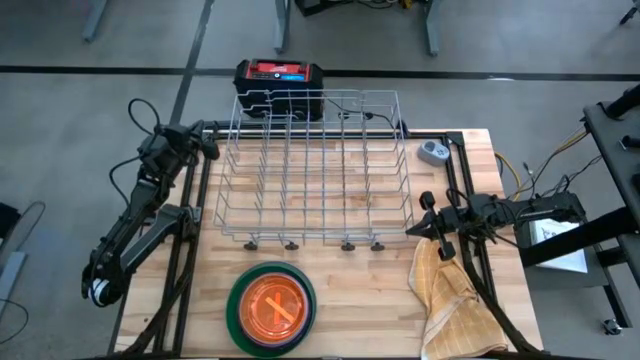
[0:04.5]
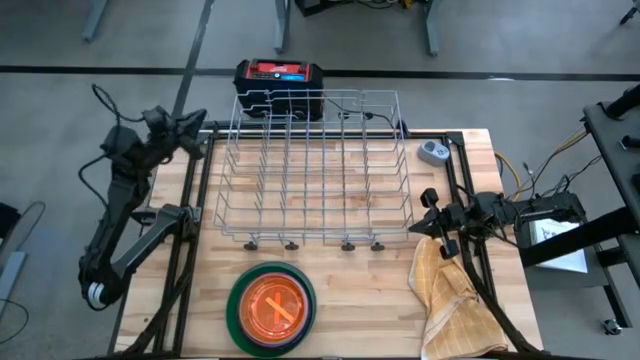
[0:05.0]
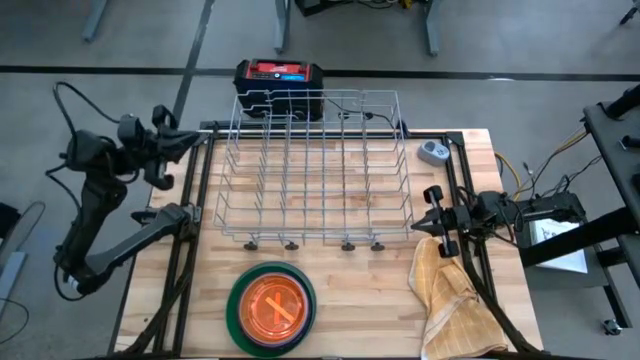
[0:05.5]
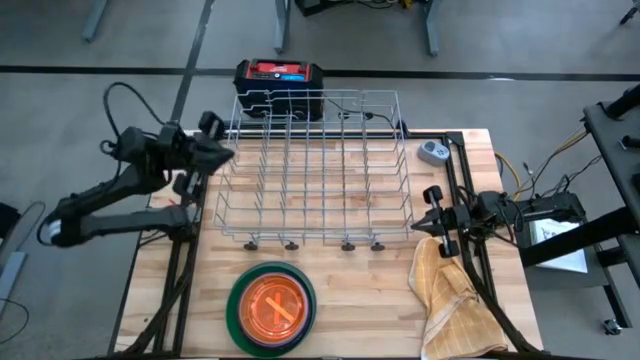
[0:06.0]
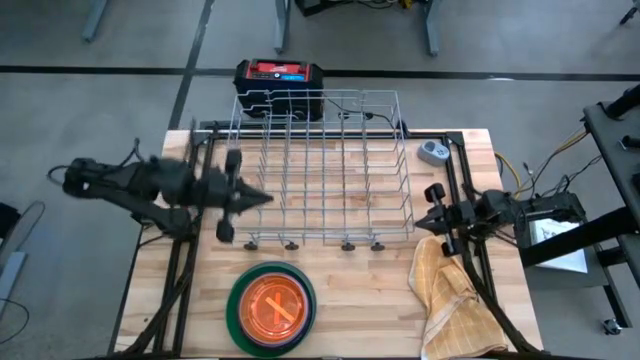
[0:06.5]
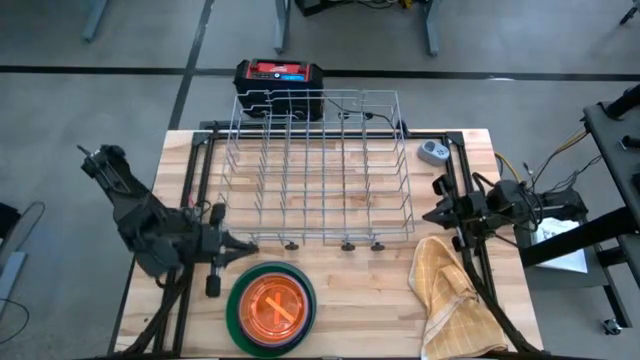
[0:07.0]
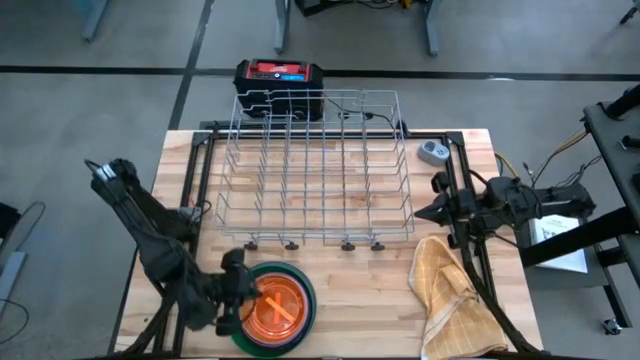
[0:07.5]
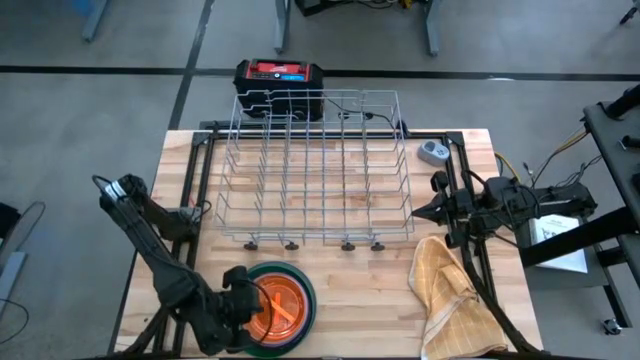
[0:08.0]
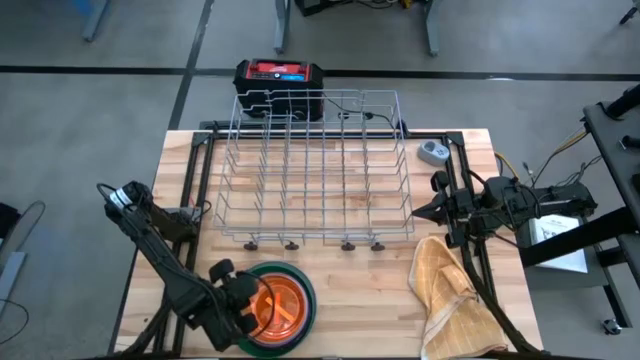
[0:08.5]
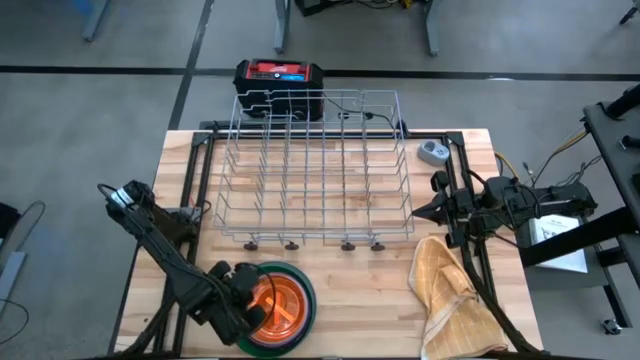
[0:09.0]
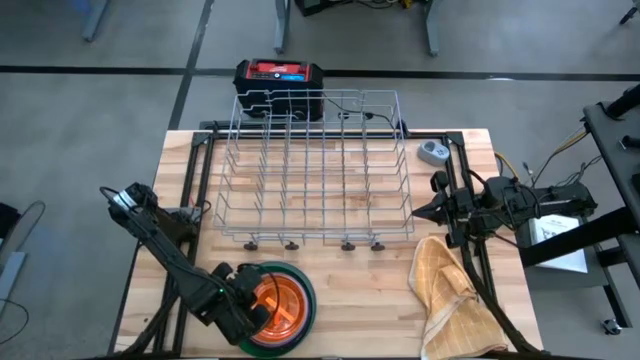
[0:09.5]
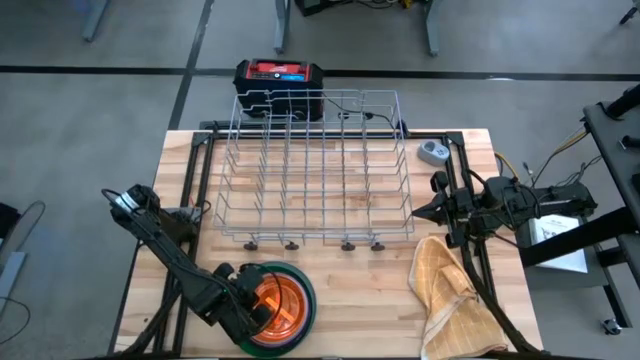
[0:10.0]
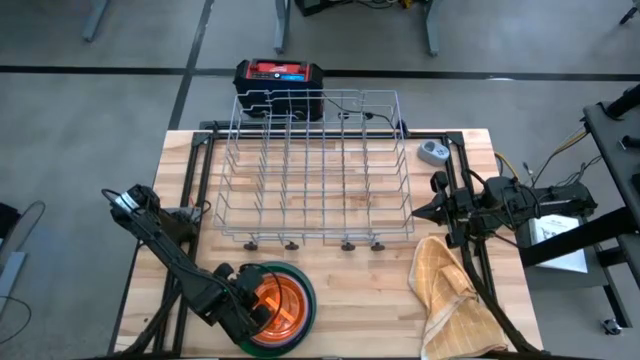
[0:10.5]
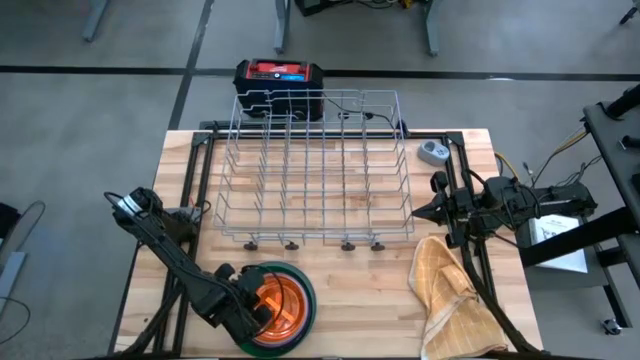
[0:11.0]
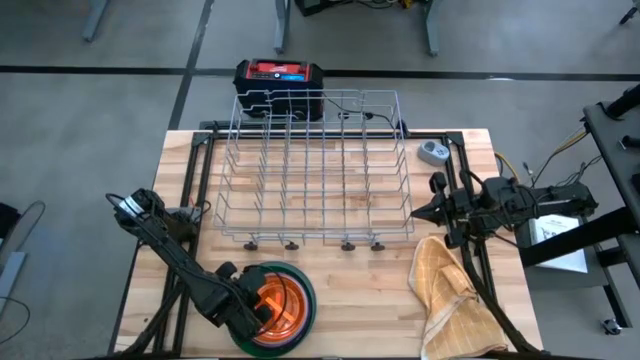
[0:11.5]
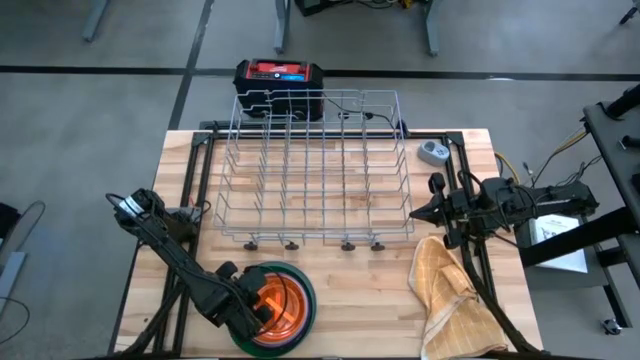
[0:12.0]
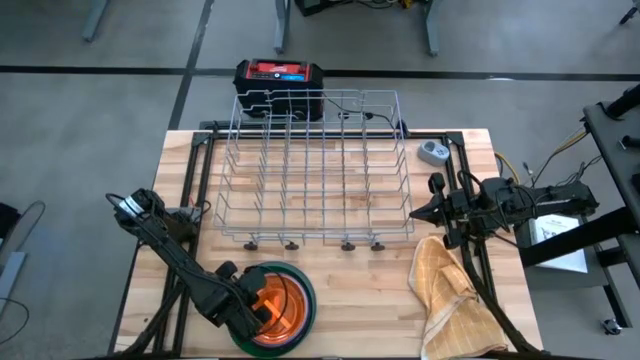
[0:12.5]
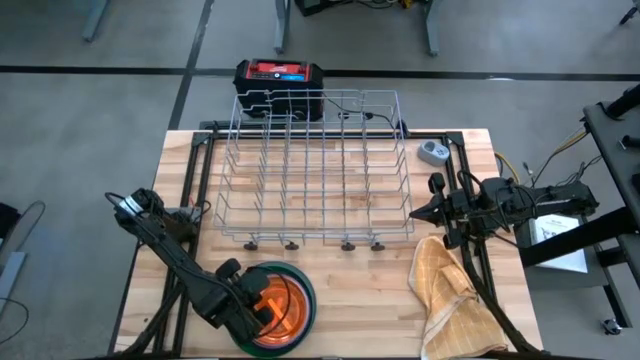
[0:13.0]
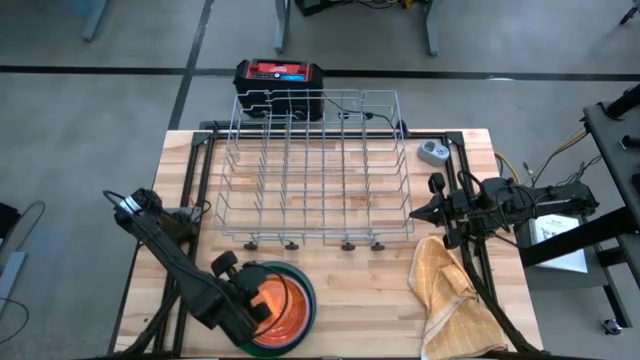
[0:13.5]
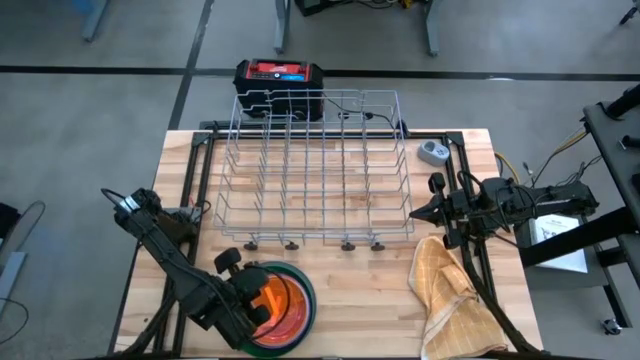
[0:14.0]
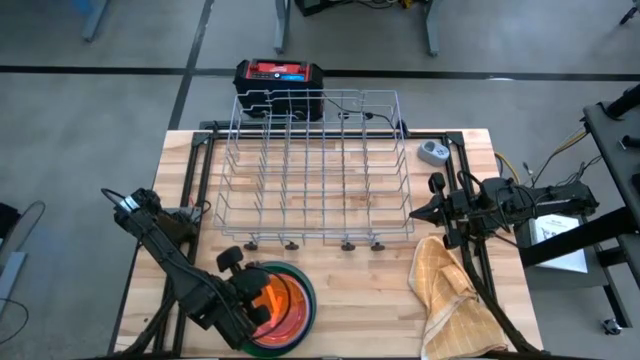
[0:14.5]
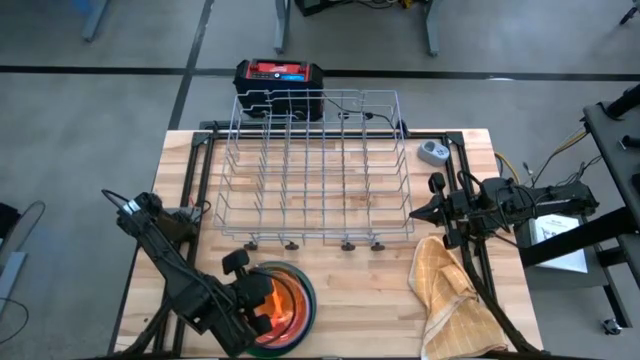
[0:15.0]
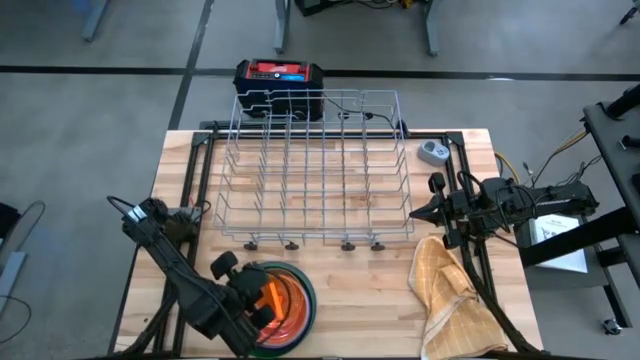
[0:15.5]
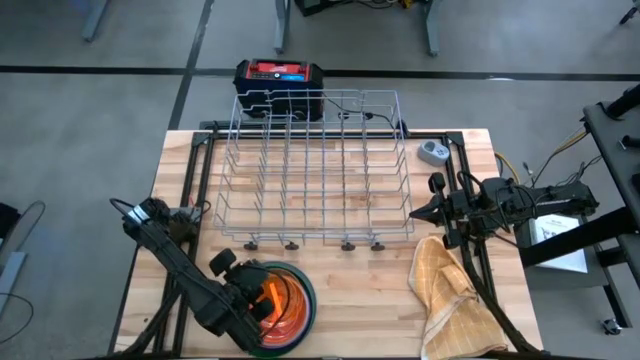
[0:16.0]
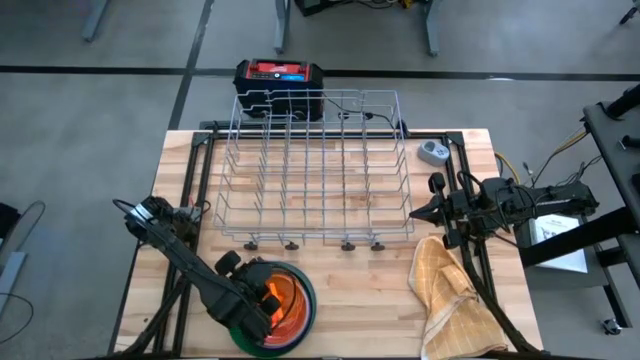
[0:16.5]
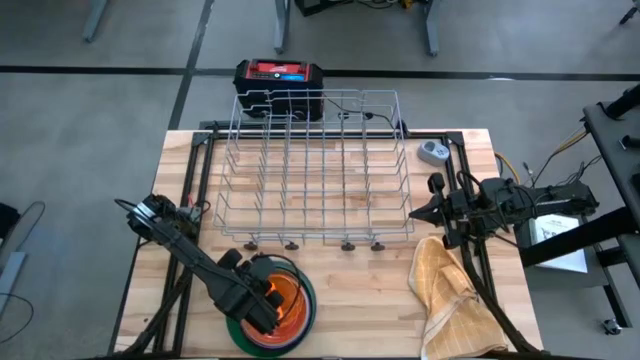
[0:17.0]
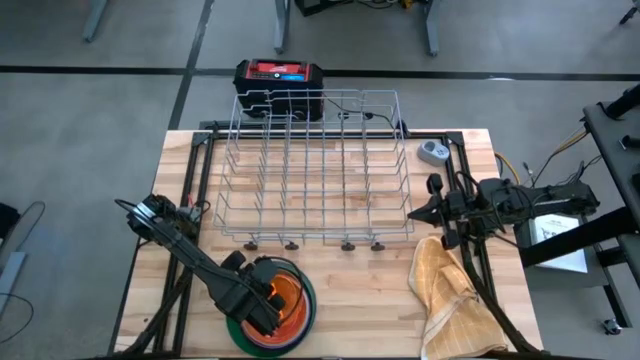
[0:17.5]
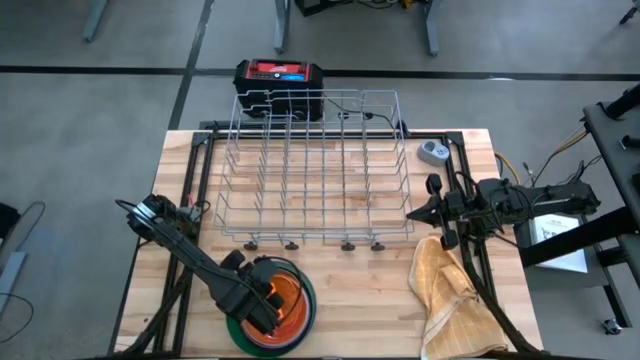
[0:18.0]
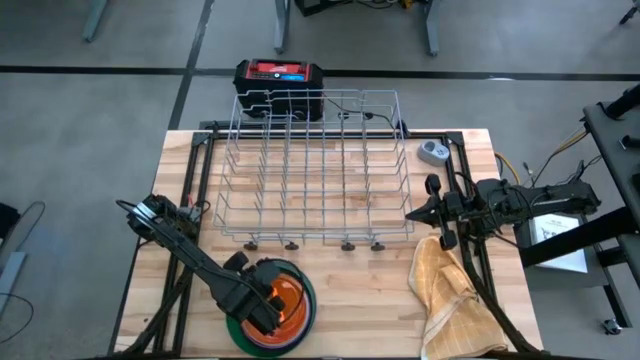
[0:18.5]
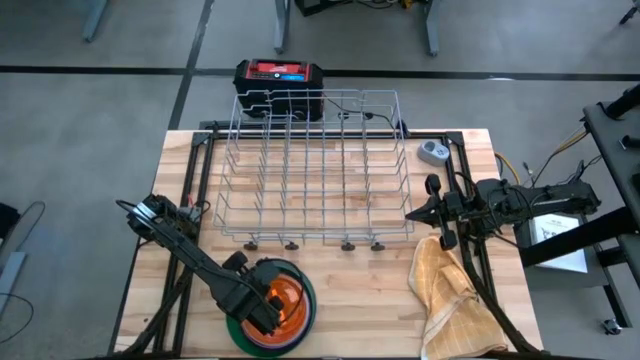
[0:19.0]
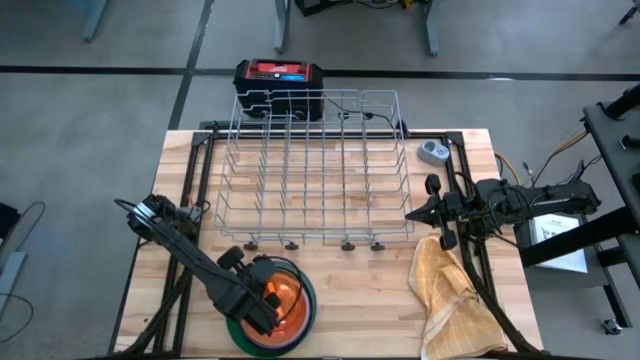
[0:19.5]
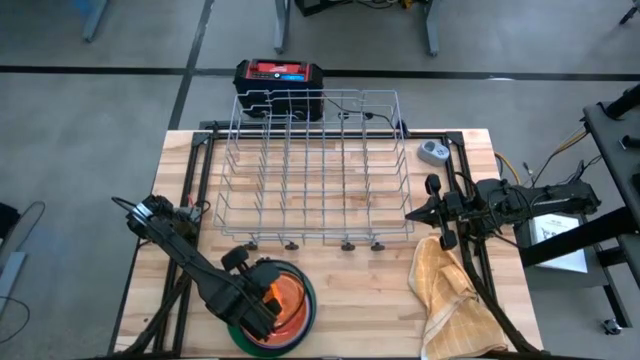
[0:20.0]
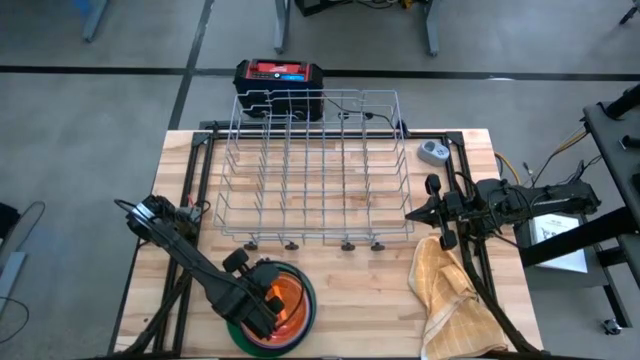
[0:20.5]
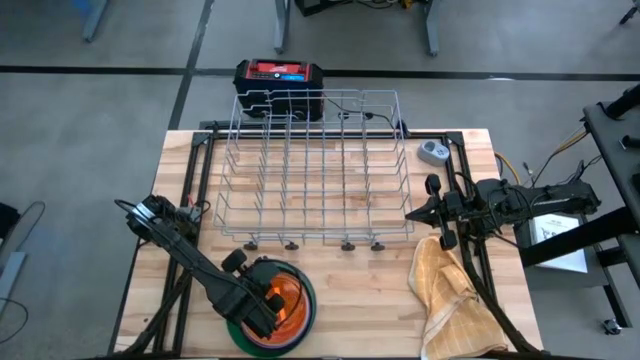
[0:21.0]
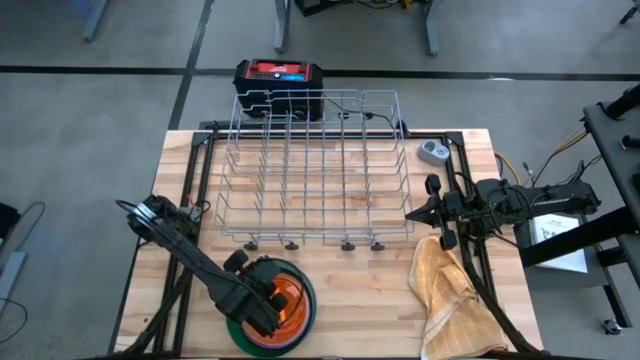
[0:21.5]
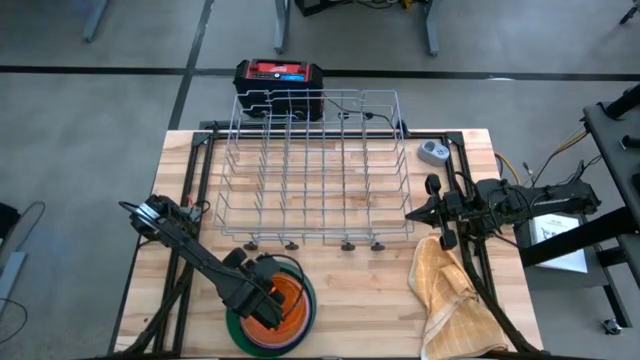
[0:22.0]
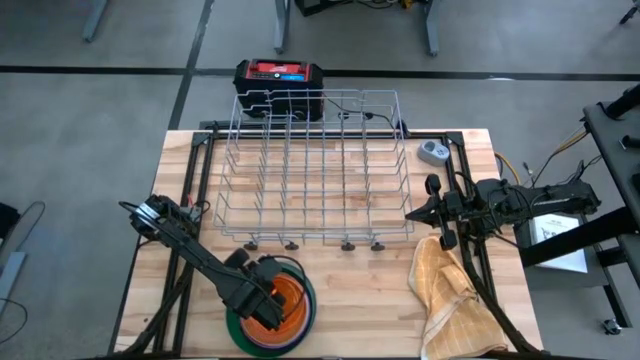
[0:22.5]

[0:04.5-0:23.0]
Task: Sort dishes
Put the transparent orange plate into the dish rack
